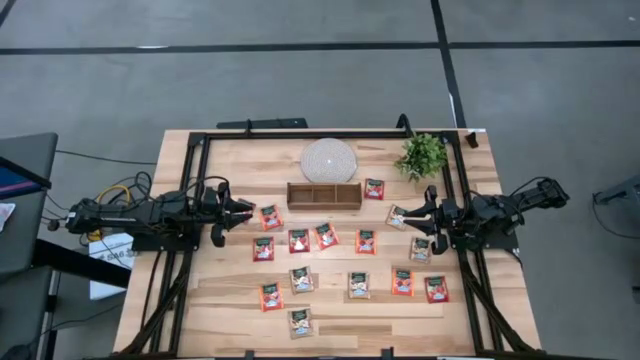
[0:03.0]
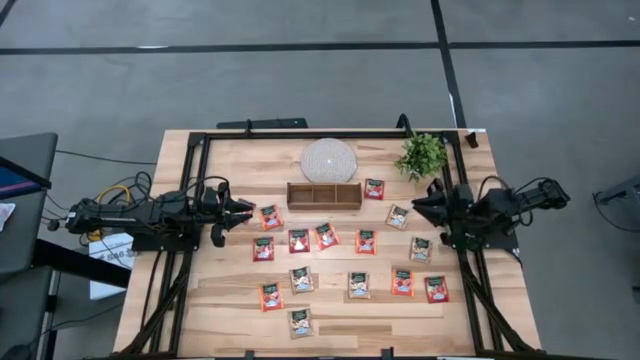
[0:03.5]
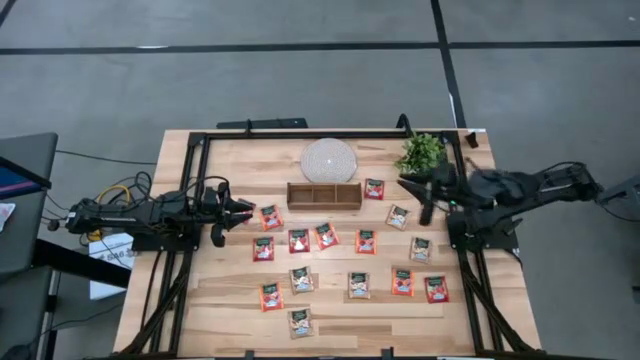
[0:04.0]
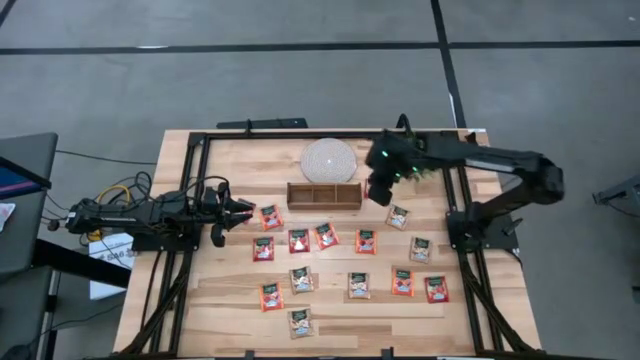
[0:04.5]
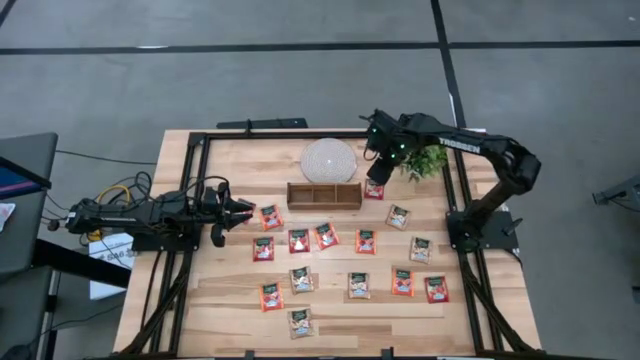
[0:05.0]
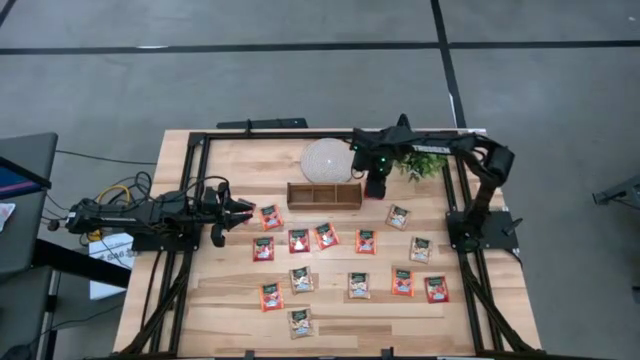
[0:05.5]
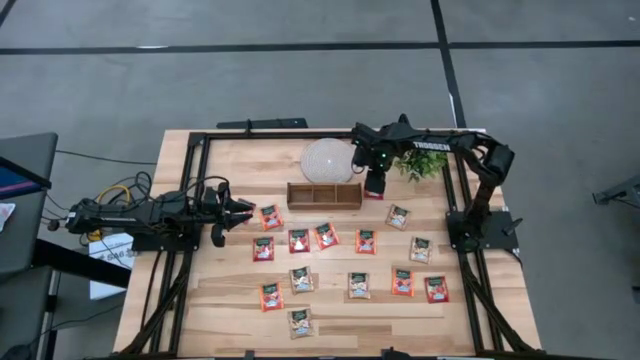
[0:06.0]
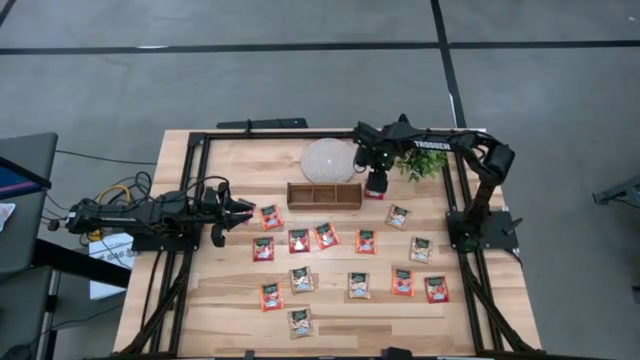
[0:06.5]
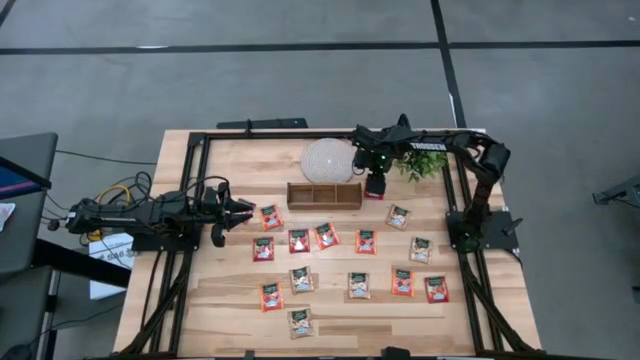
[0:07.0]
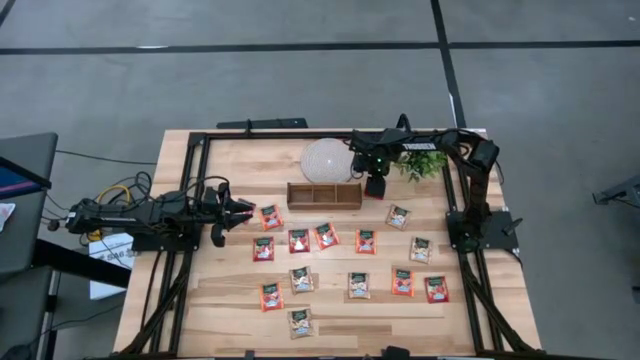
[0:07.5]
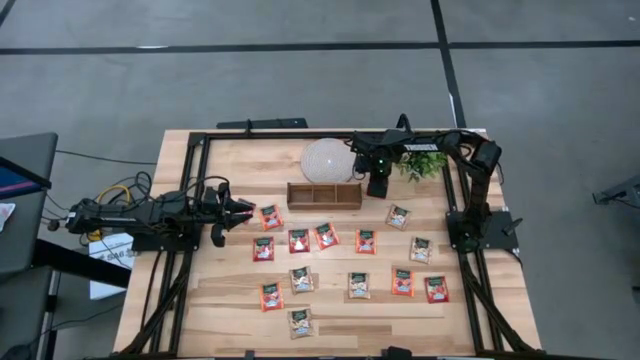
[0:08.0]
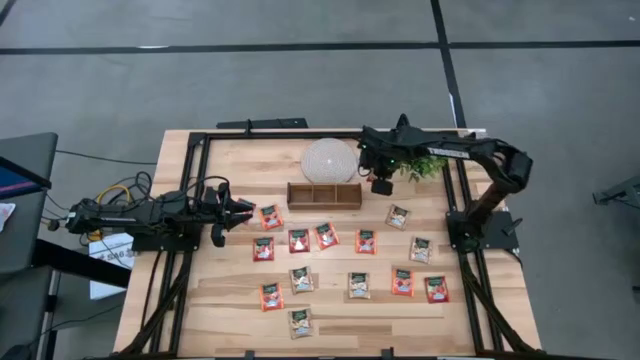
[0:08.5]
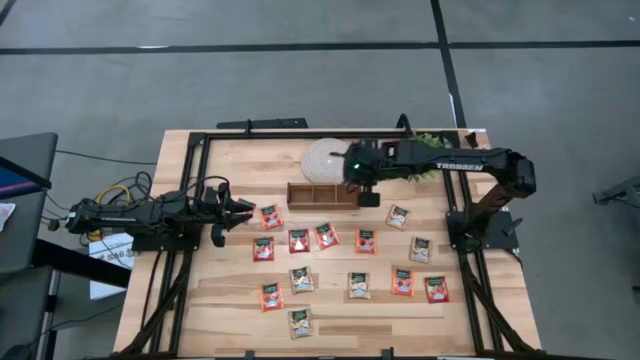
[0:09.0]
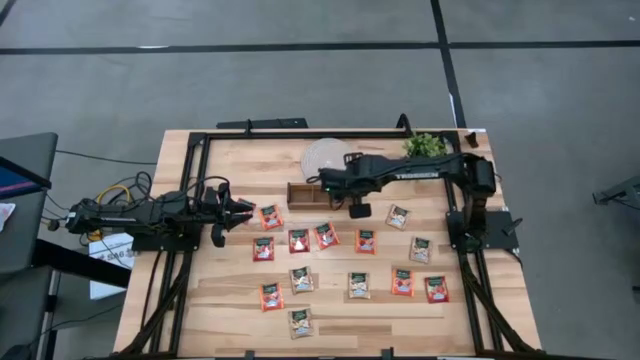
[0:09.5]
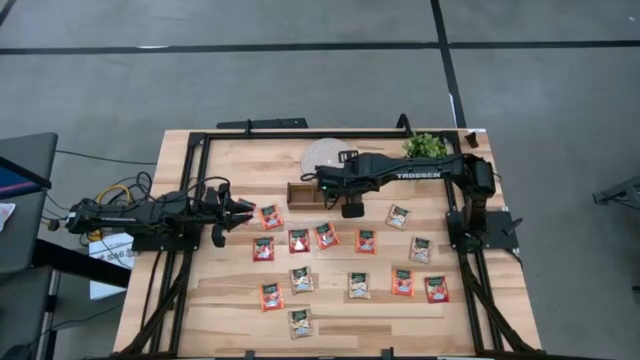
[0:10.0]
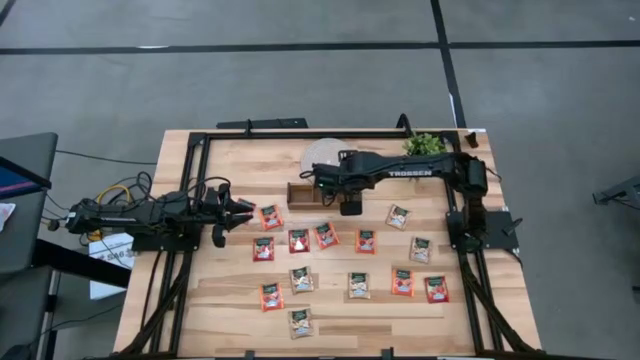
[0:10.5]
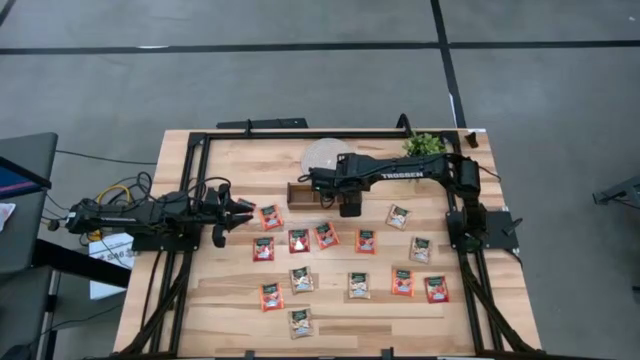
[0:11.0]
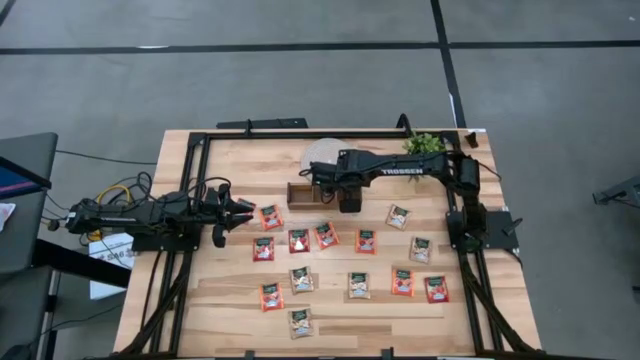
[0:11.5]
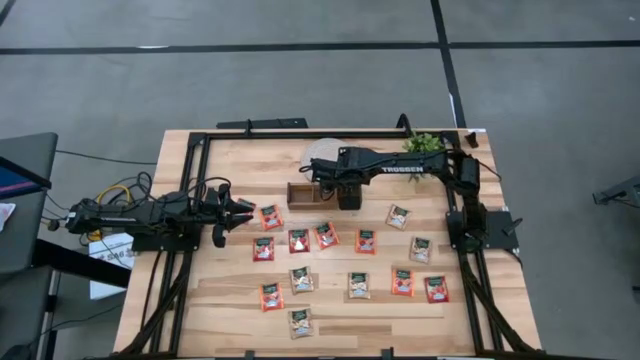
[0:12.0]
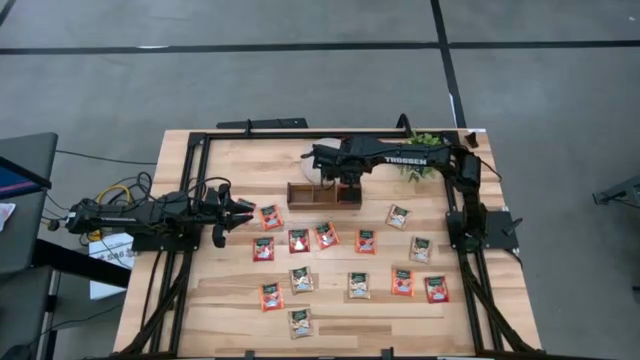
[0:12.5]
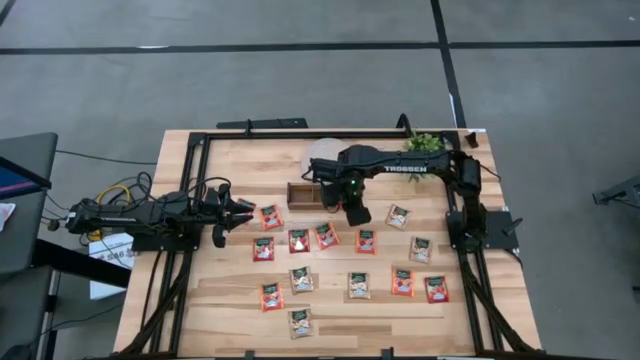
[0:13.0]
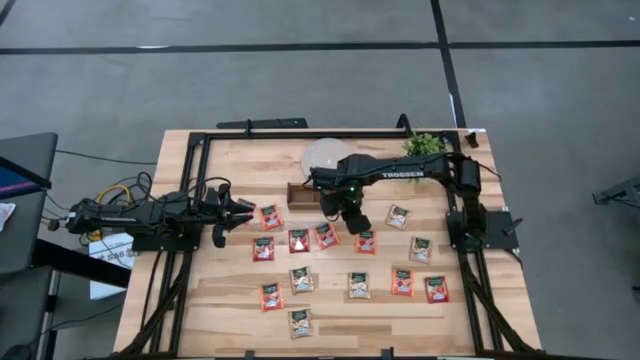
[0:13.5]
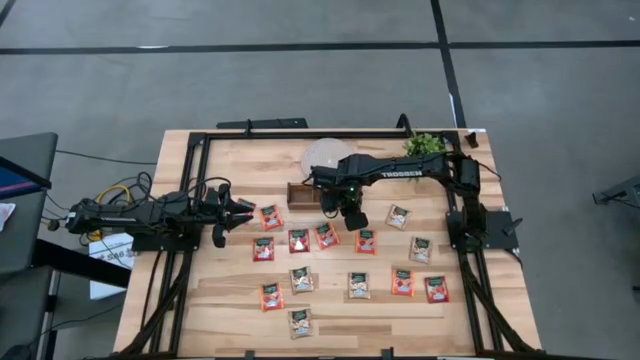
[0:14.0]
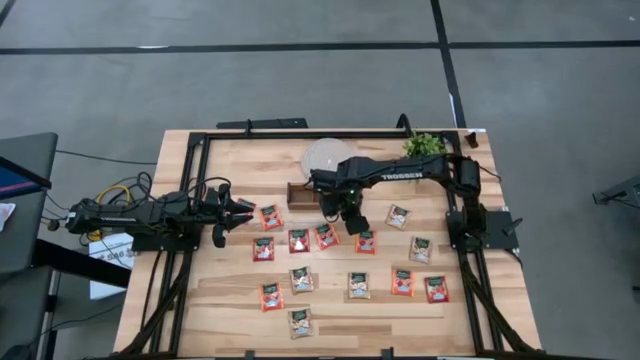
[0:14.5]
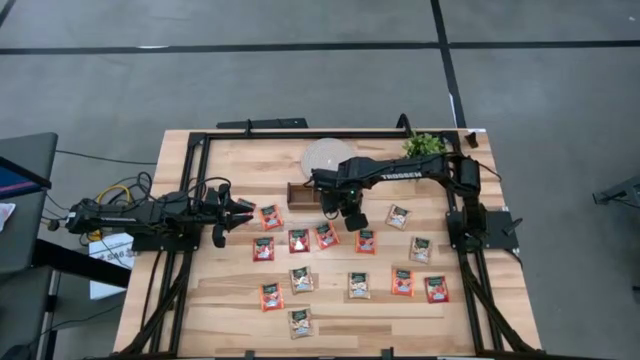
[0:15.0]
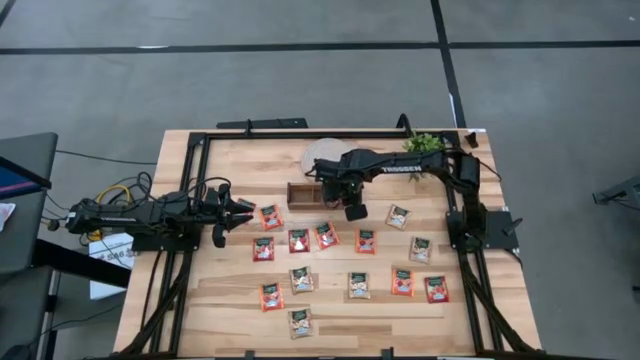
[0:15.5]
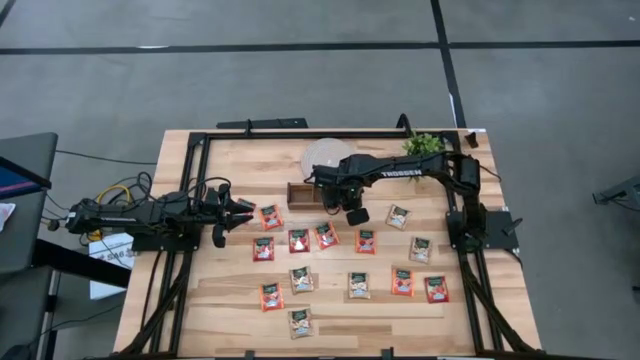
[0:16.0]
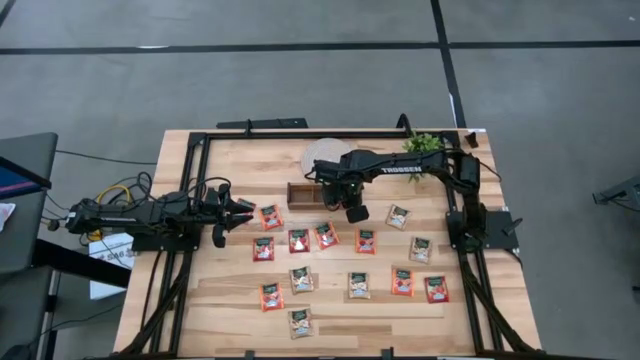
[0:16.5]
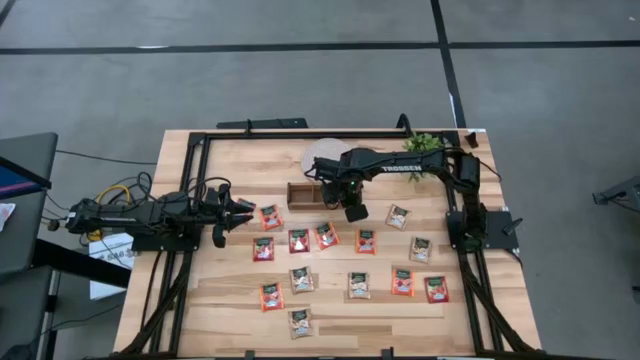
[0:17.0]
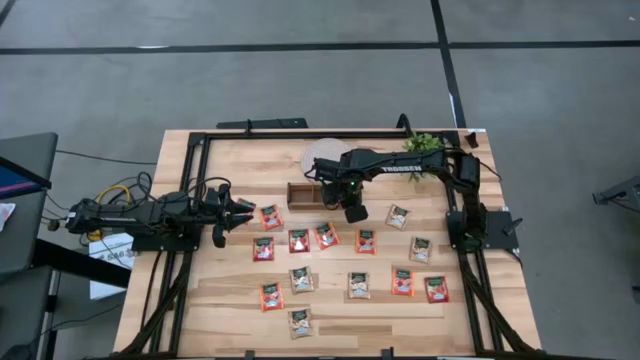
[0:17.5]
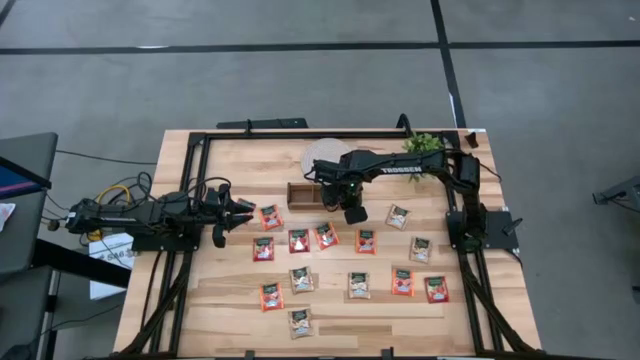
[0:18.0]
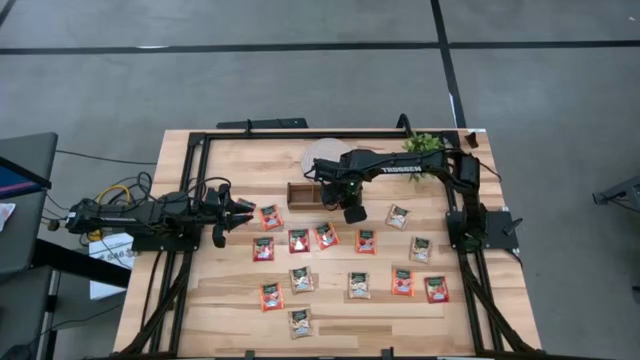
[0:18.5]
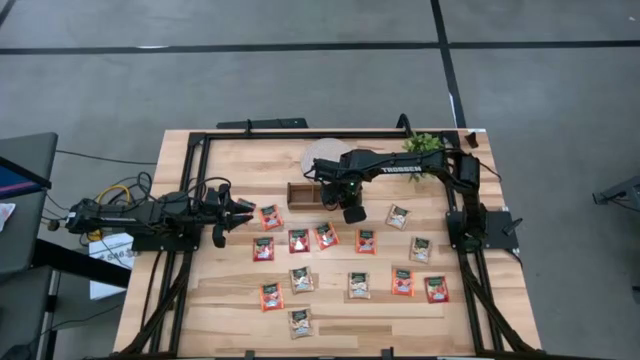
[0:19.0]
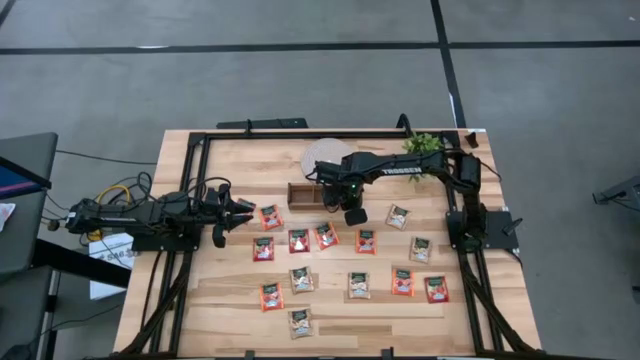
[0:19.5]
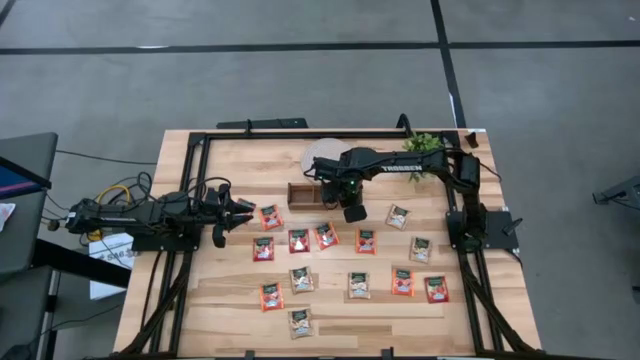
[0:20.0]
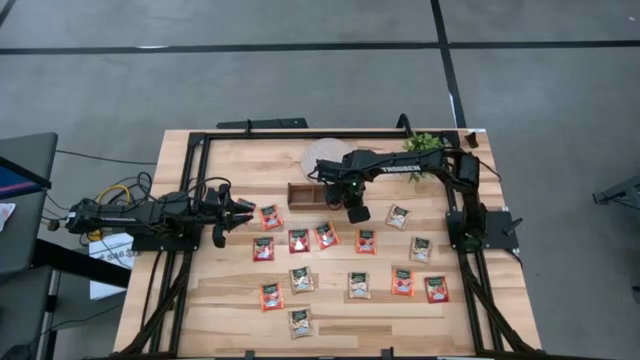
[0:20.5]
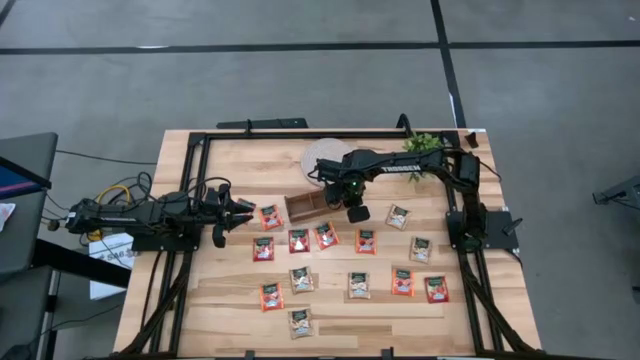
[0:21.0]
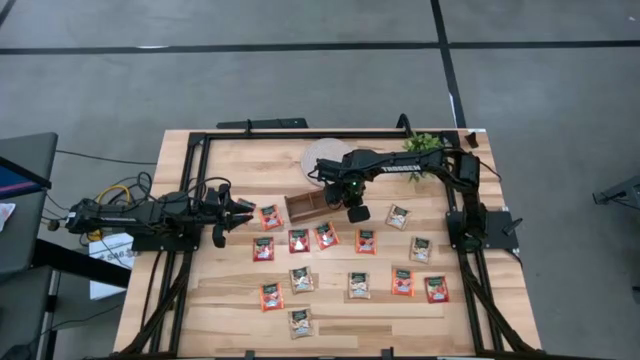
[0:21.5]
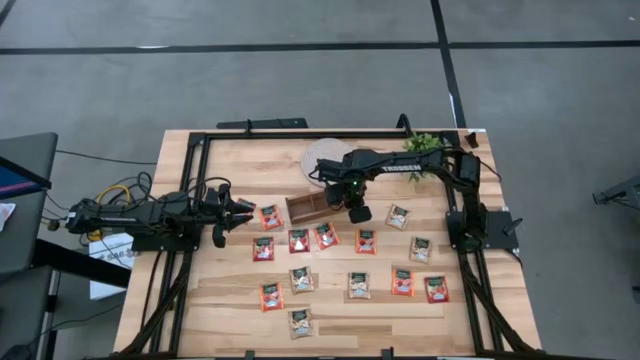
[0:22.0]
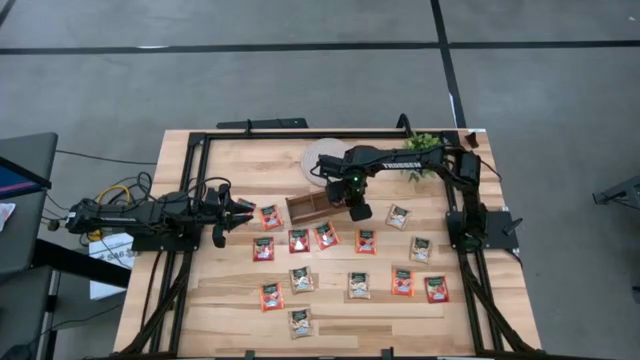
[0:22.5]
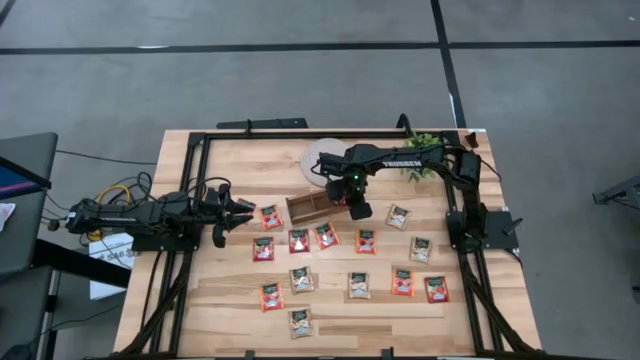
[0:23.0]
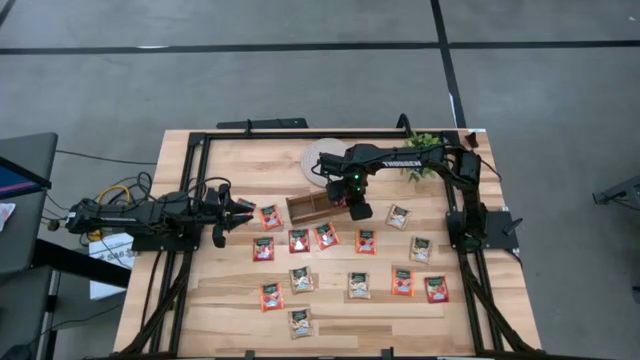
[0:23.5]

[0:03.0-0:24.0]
Task: Pick & Place Tea
Put the red tea bag into the right slot of the wooden organizer
